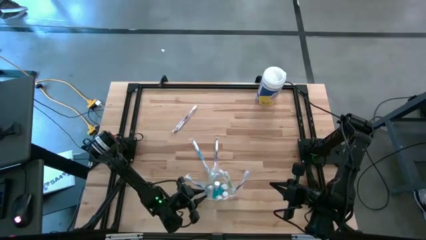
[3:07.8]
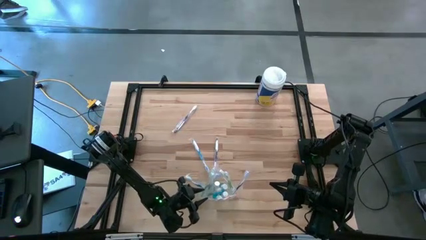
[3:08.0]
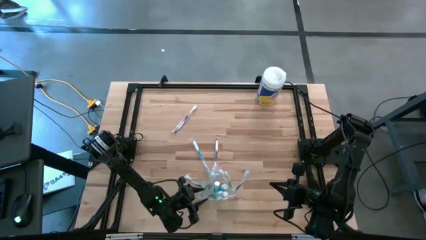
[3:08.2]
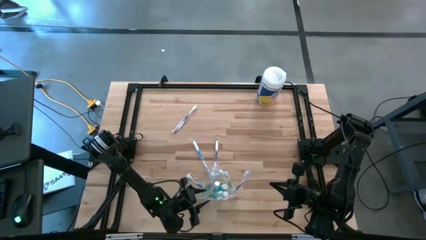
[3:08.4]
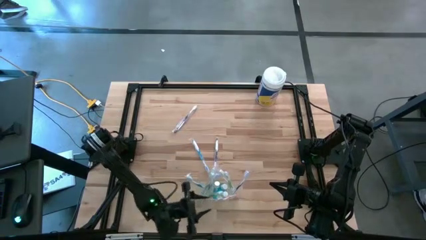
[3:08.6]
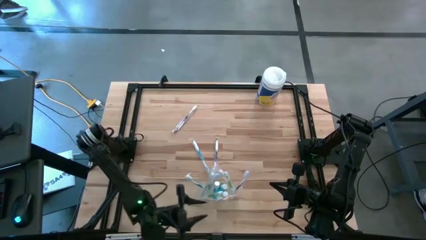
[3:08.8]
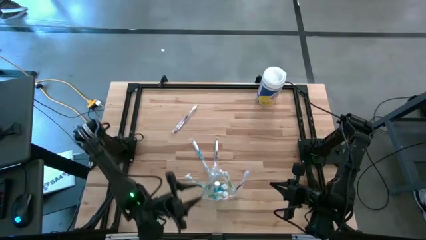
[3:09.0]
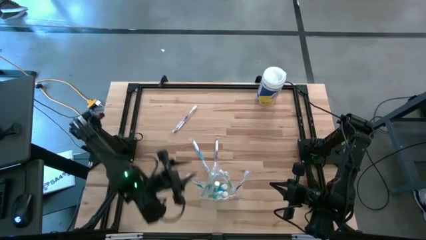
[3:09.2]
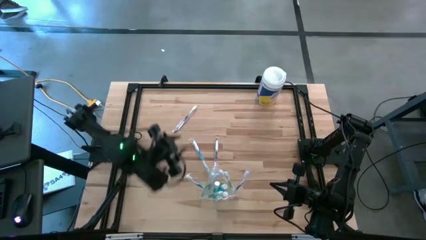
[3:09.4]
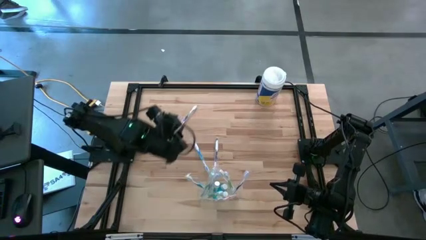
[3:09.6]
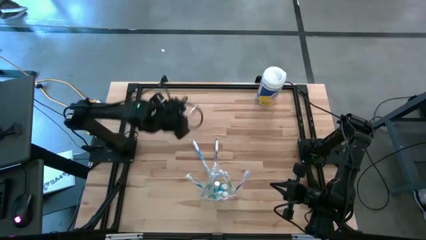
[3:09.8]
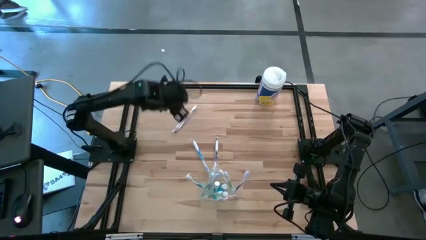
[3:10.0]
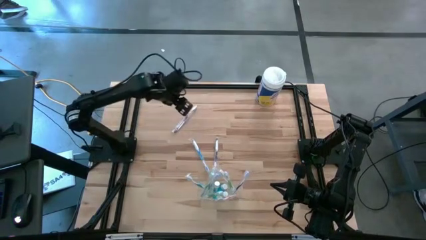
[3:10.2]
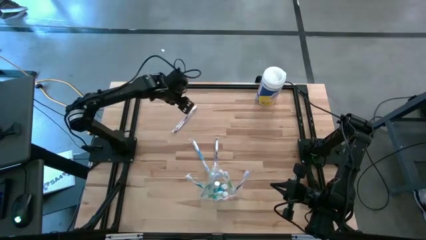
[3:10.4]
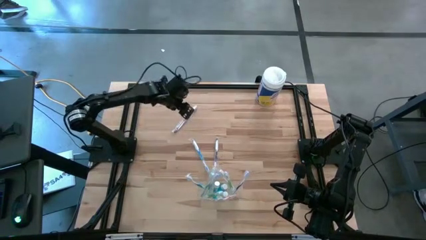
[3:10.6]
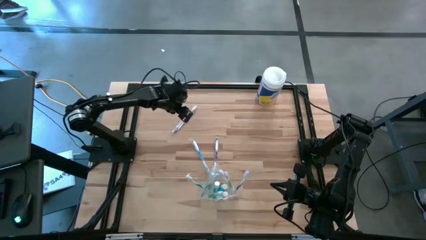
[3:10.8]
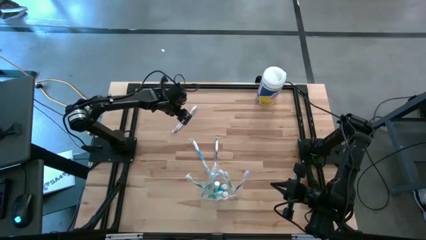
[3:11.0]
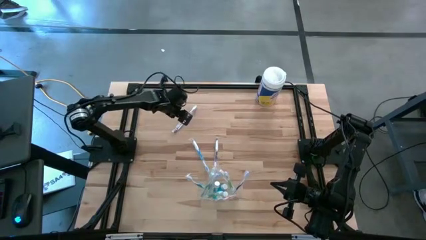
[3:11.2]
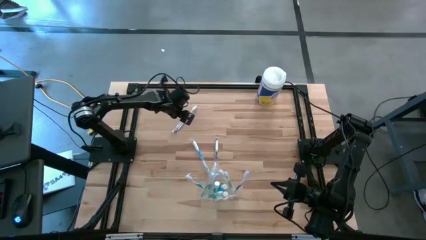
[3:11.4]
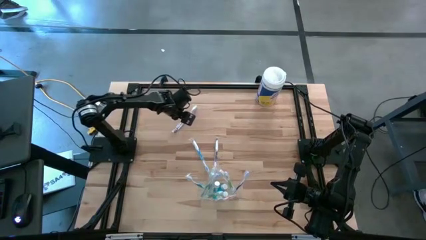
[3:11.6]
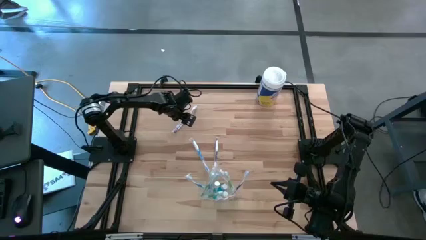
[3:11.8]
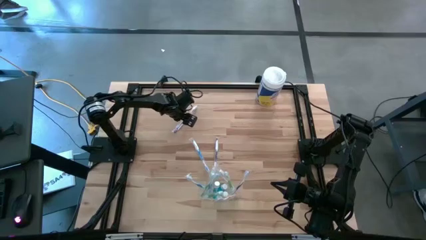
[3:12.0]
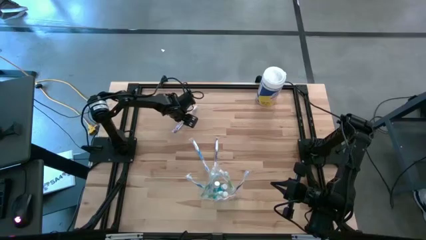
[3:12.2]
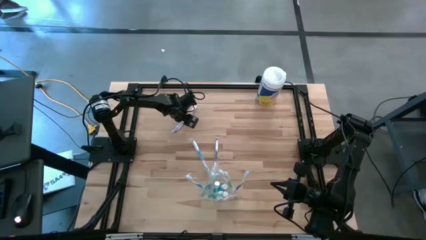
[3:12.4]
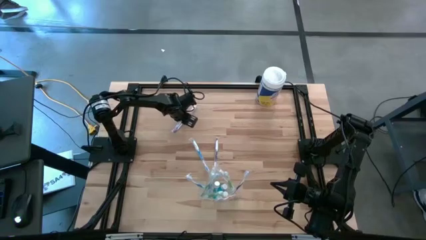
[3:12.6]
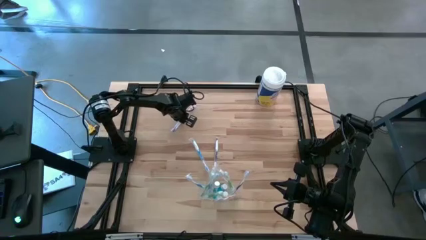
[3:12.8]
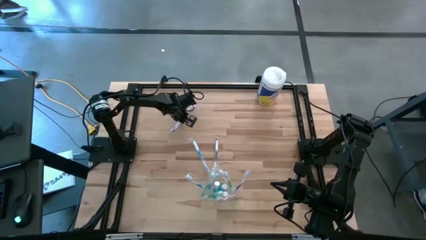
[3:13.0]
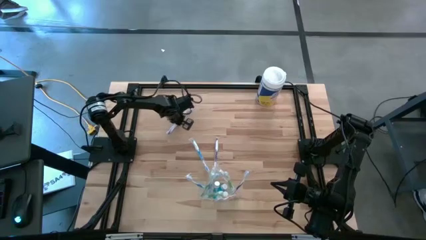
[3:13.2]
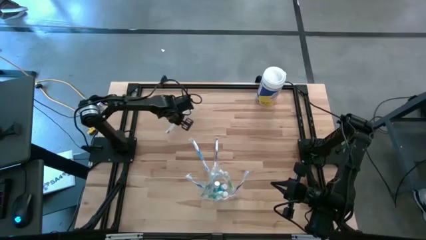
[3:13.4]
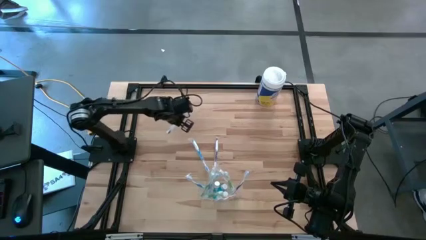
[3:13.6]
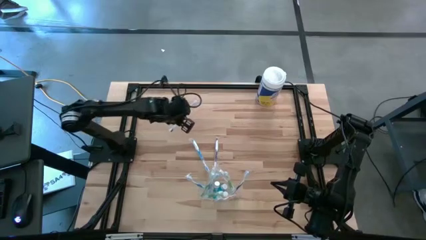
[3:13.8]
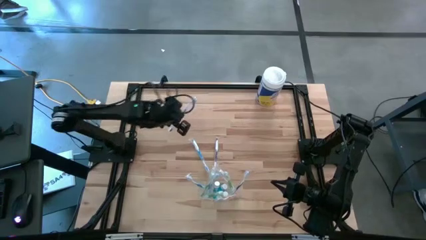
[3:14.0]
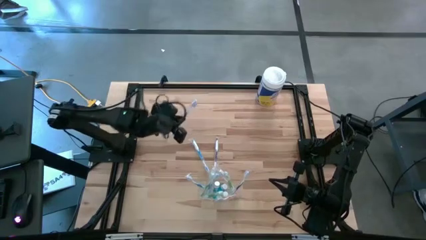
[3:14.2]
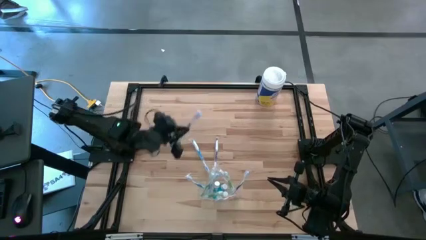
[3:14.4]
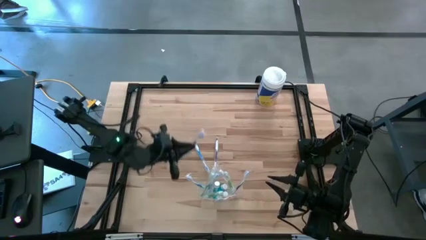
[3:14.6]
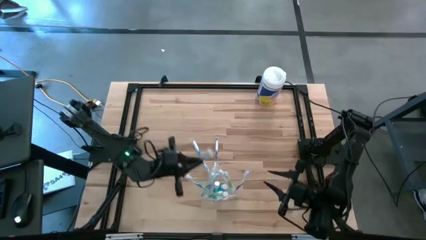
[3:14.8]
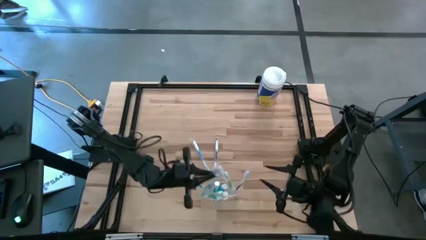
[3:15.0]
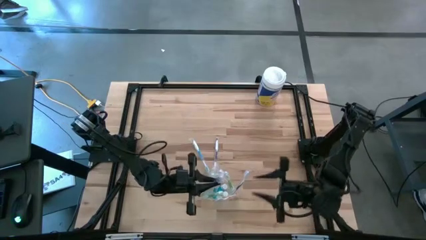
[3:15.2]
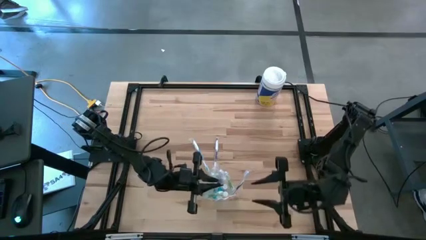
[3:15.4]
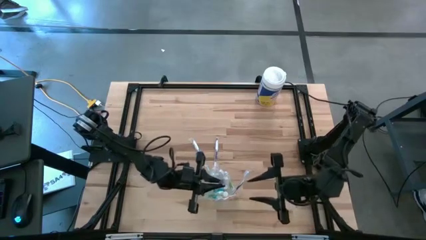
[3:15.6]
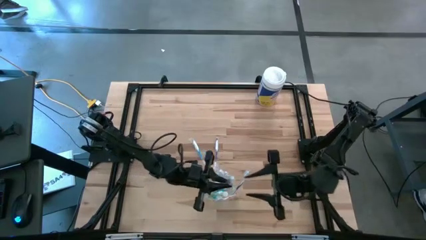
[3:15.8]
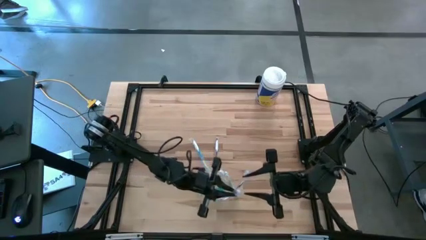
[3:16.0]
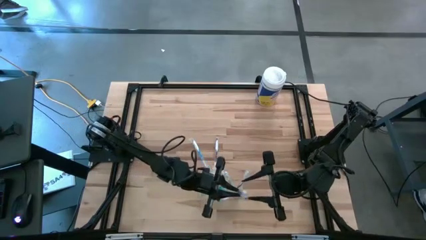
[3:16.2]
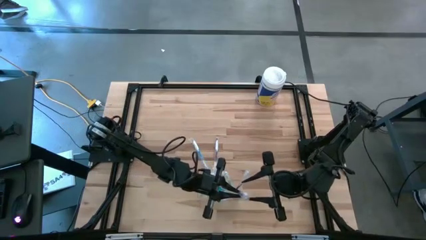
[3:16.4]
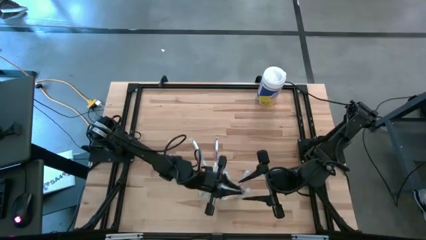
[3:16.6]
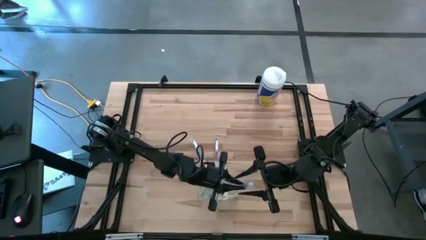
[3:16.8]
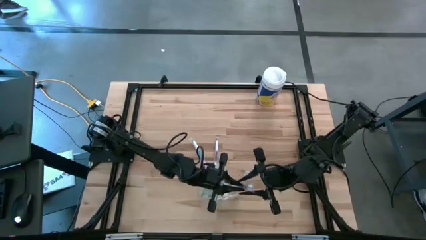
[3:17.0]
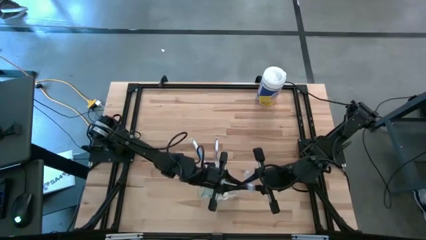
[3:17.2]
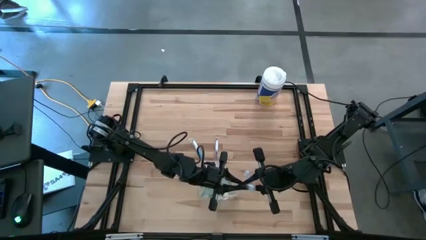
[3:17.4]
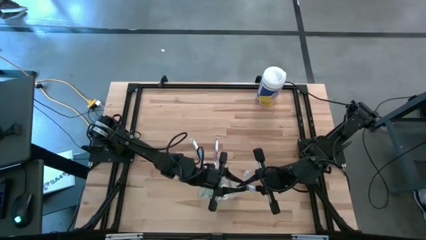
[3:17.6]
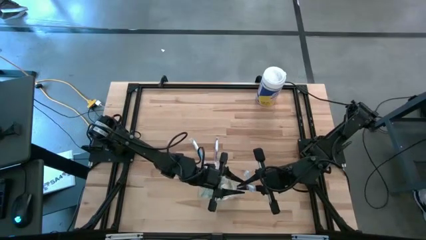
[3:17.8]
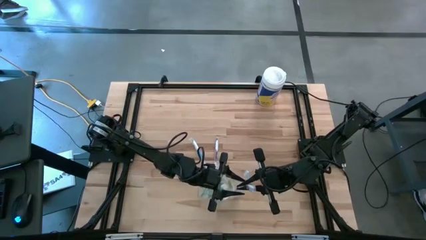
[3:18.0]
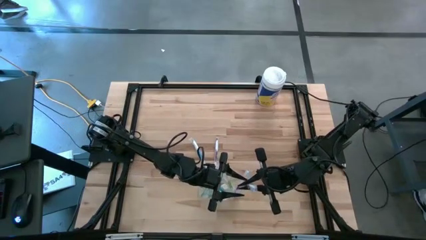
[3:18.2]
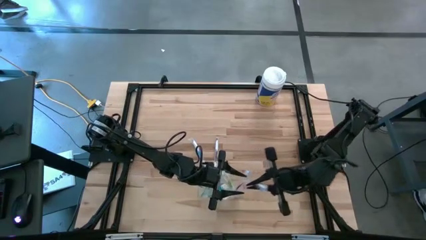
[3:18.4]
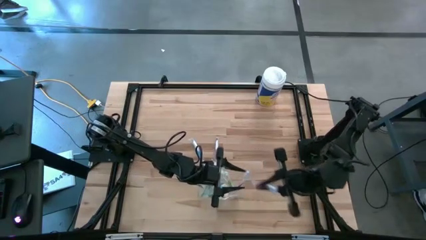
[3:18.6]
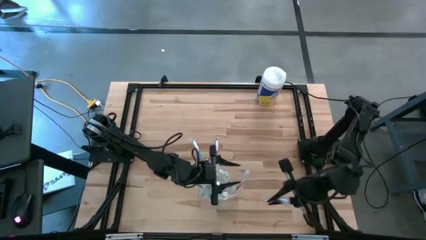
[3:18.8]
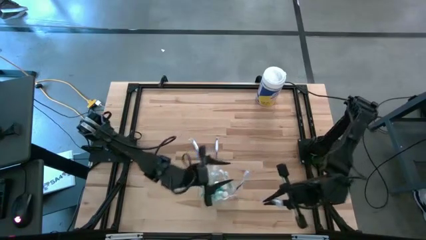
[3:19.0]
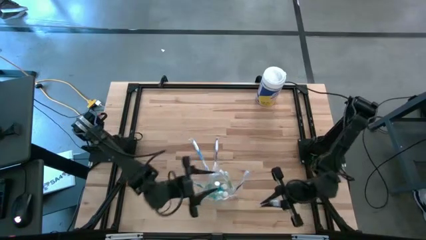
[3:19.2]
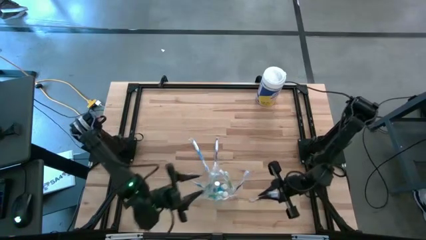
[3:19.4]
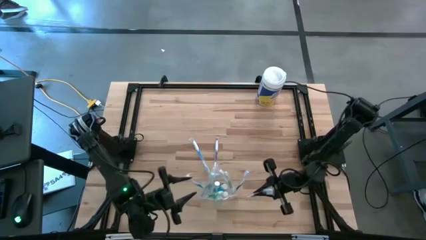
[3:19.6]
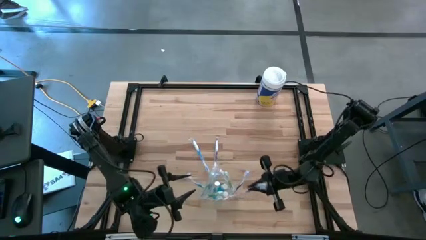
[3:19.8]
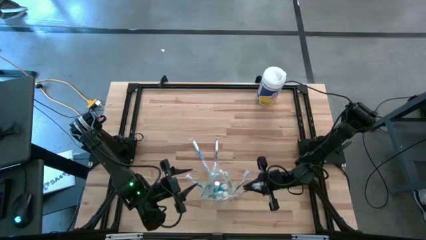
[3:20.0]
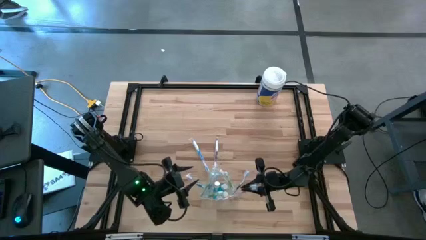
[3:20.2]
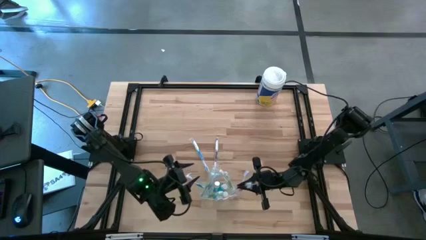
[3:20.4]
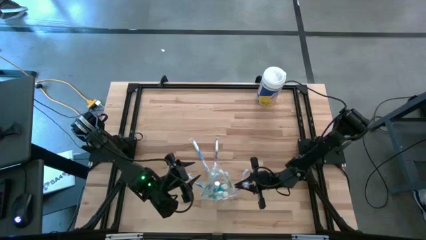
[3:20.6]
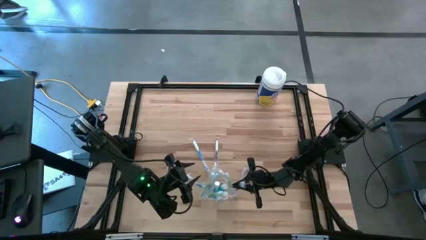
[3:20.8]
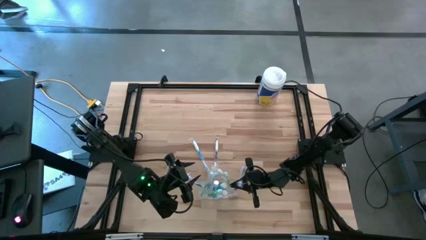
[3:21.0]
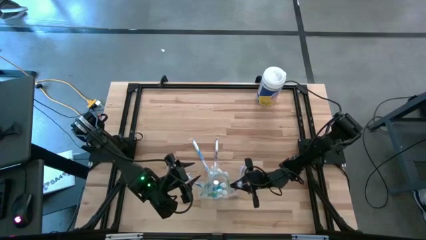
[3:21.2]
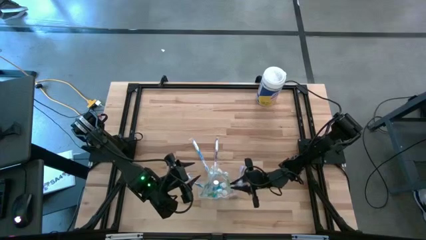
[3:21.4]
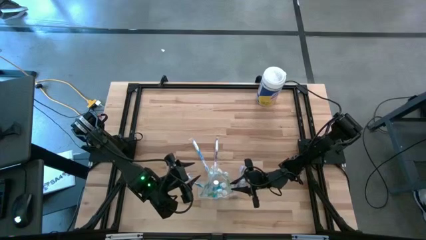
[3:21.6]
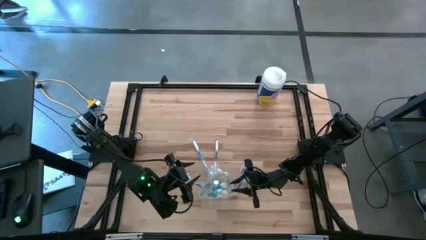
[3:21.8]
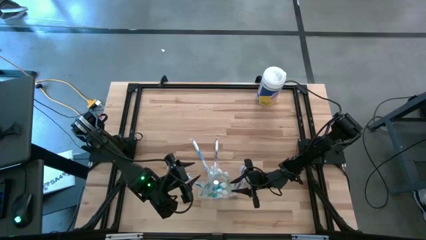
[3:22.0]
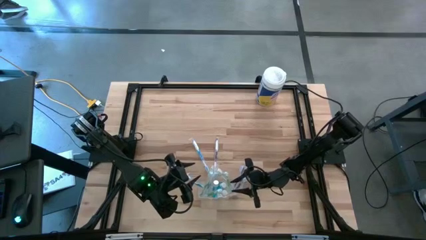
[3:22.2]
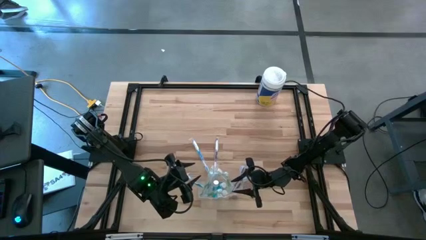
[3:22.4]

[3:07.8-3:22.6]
Task: Pick & Place toothbrushing station
Put the purple toothbrush into the transparent organizer

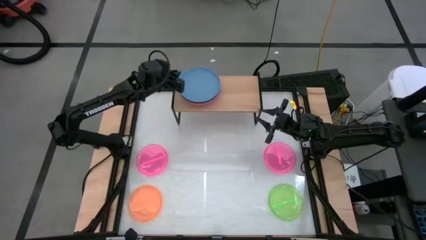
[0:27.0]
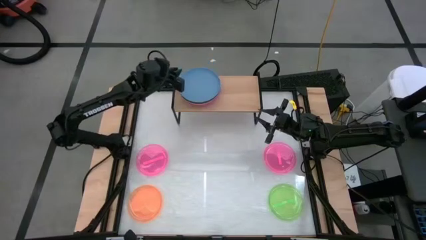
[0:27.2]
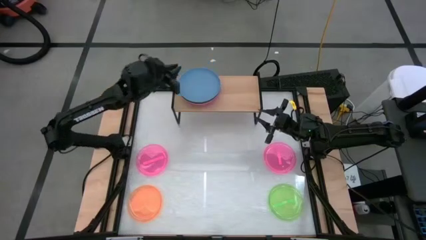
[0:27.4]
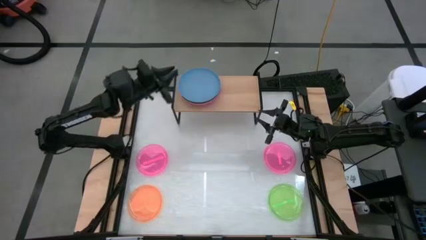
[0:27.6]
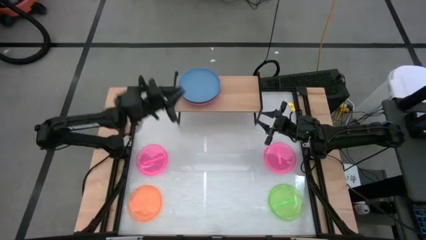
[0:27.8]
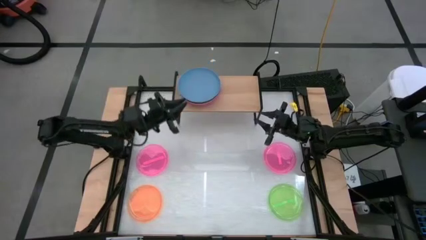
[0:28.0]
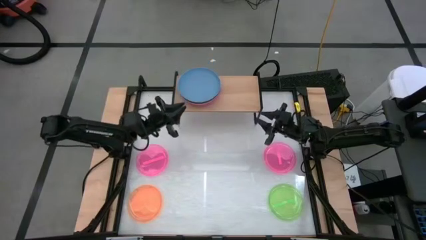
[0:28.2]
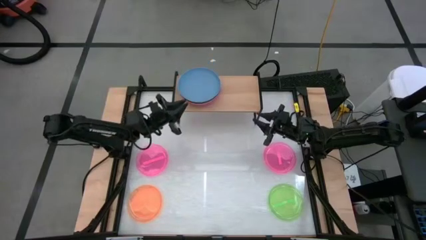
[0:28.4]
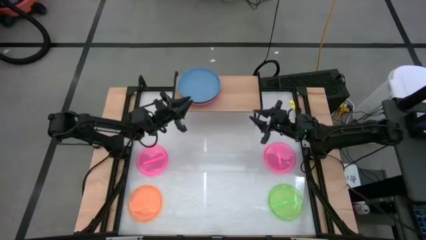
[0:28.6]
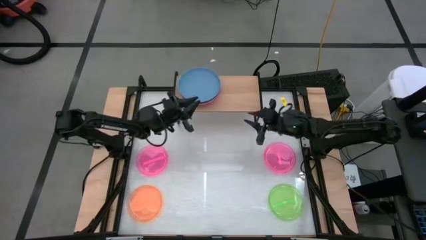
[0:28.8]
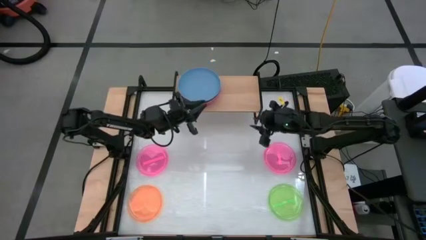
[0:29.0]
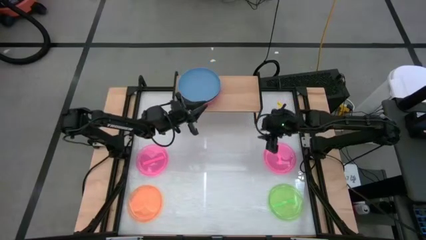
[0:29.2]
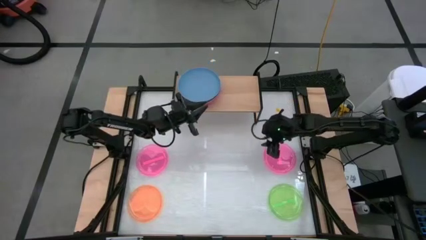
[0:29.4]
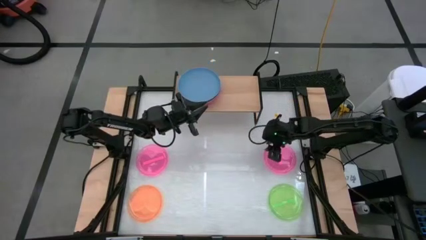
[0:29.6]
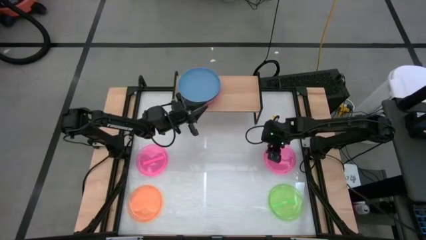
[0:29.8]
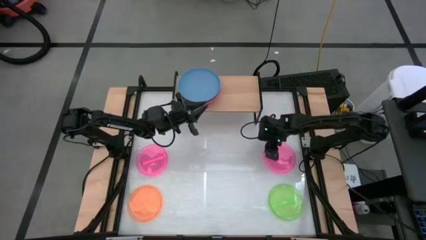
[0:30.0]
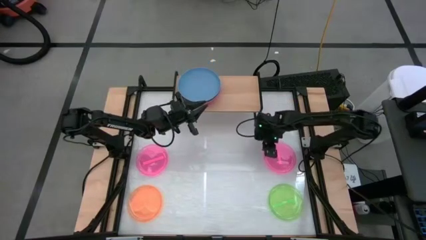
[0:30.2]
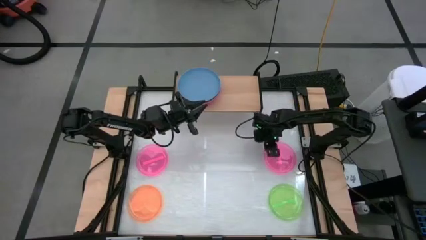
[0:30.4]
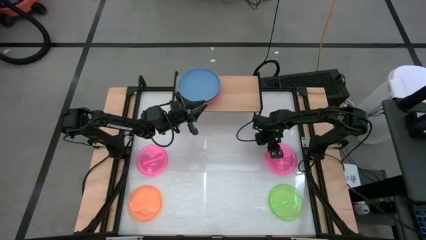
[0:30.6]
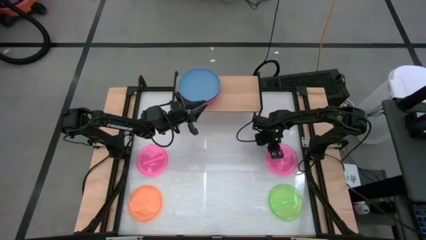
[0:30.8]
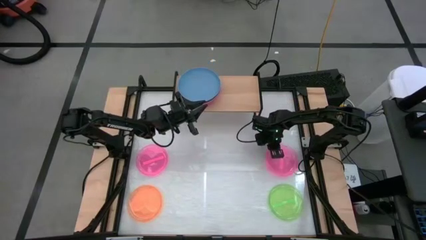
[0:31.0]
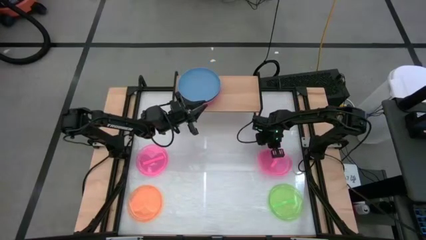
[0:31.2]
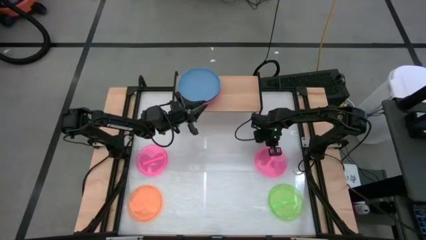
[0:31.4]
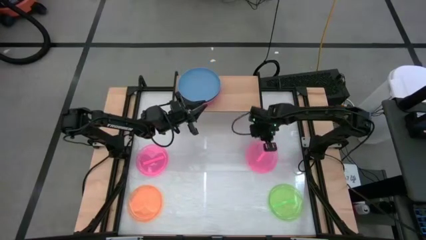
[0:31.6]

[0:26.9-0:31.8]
Task: Place and stack plates onto a shelf
Put the right pink plate on the shelf
